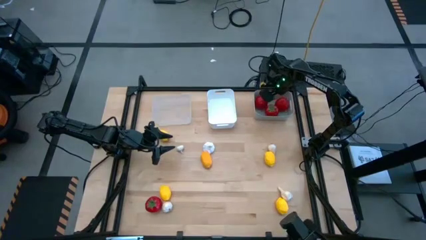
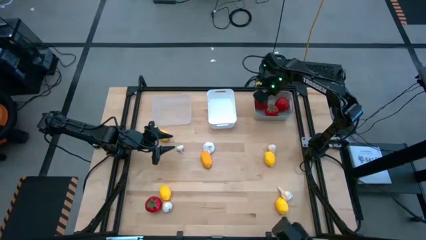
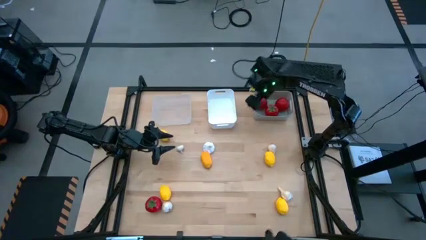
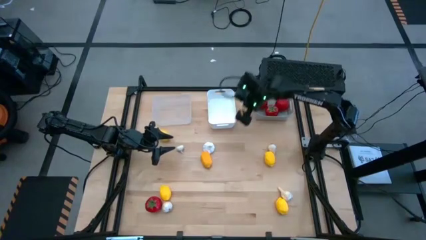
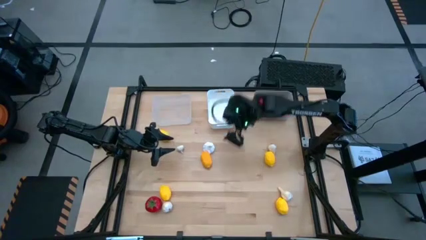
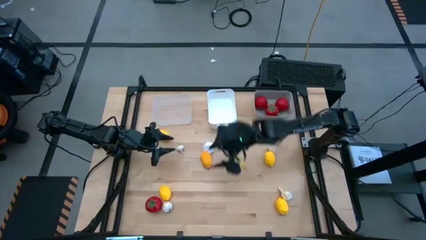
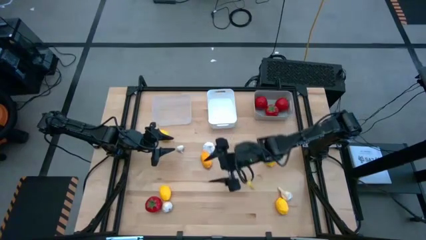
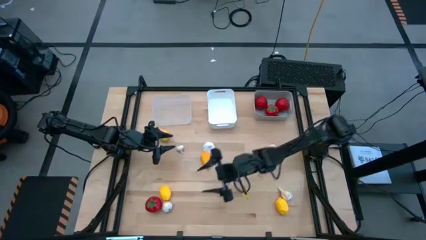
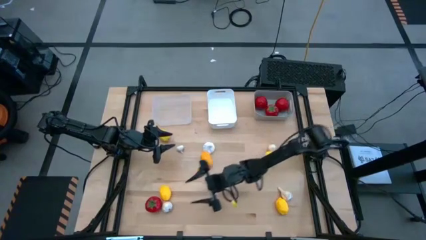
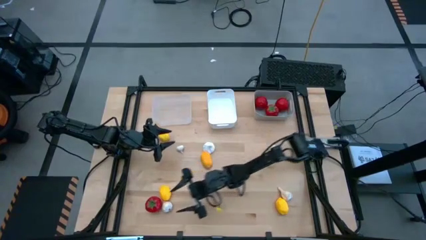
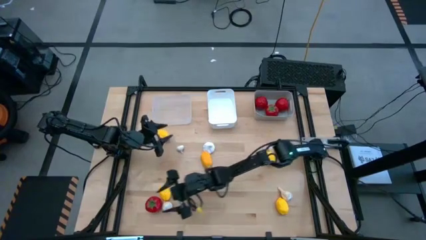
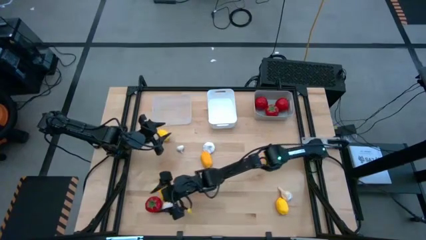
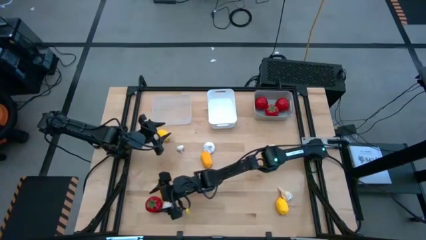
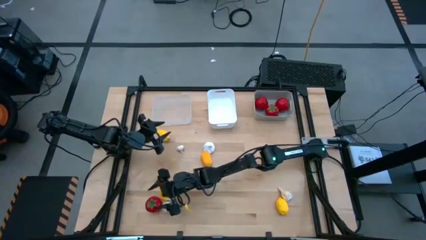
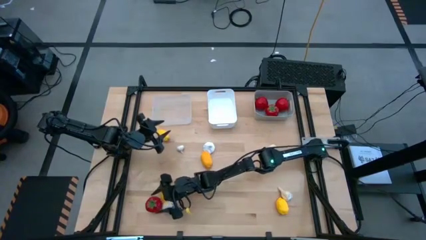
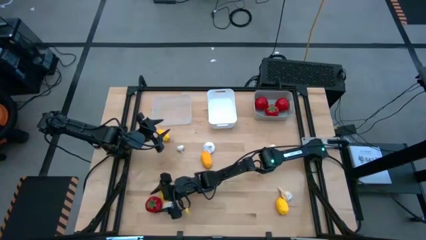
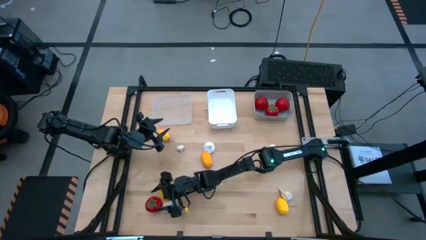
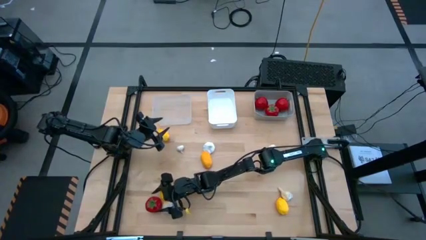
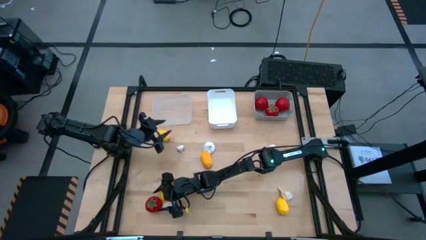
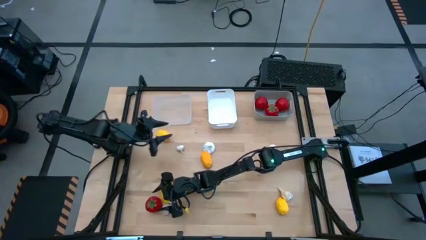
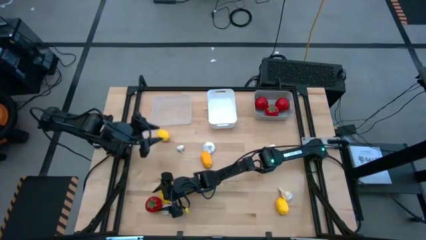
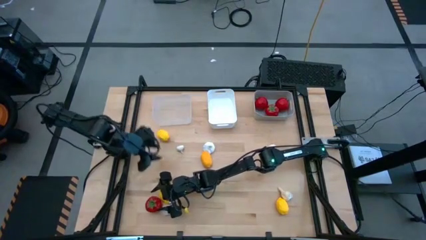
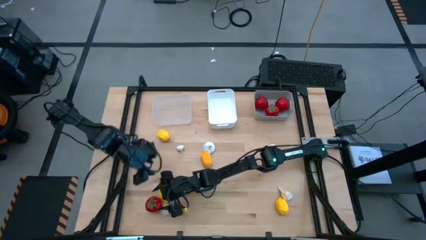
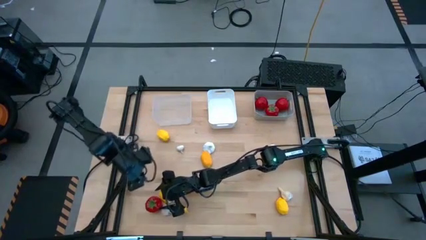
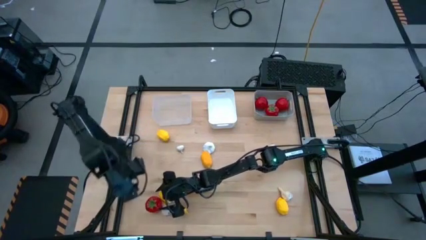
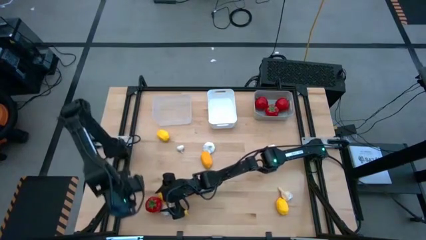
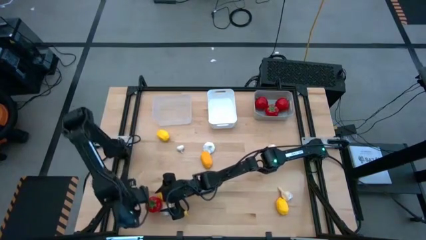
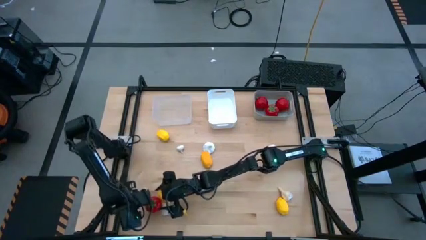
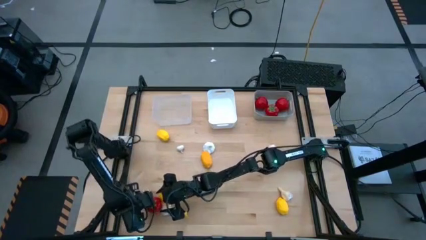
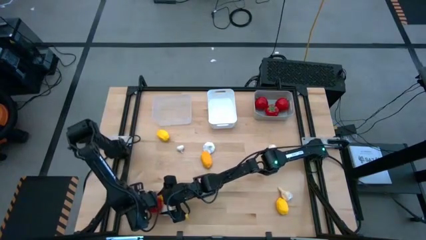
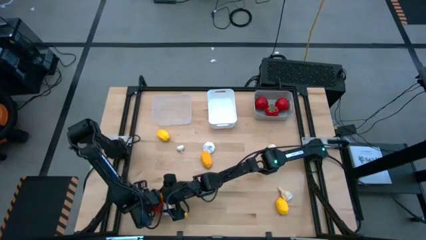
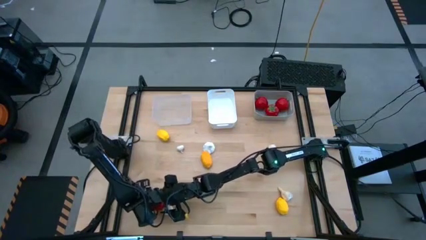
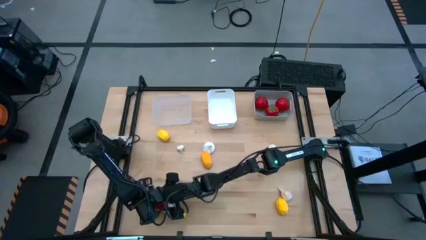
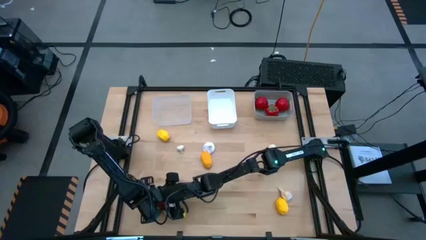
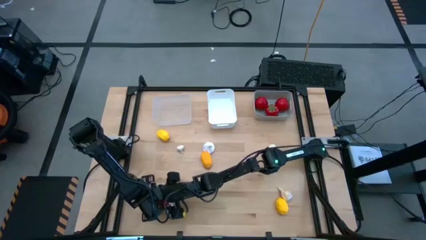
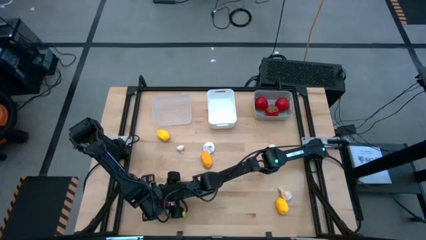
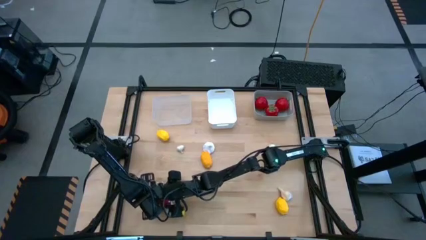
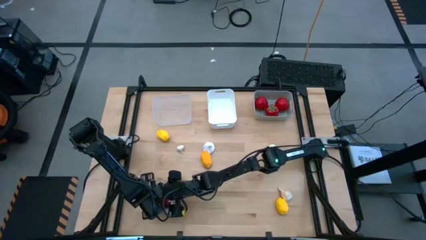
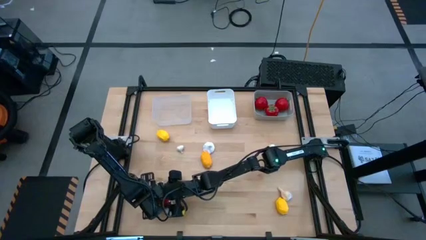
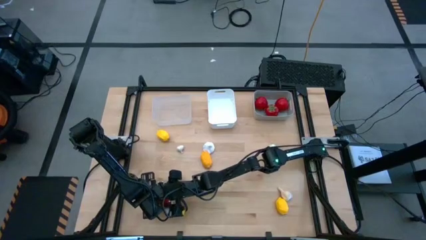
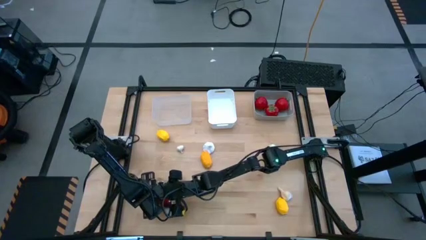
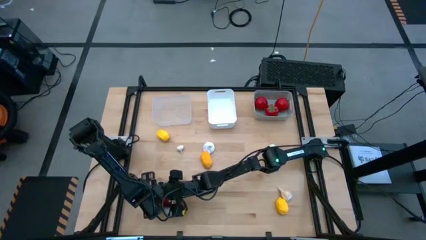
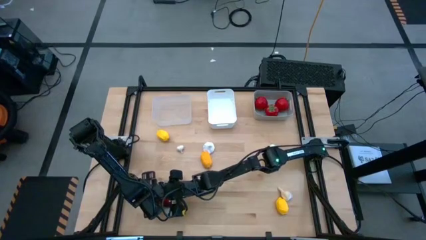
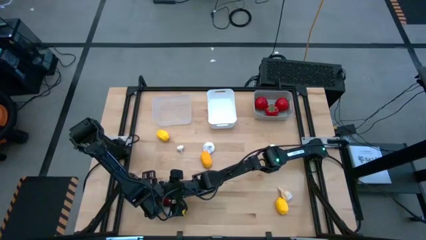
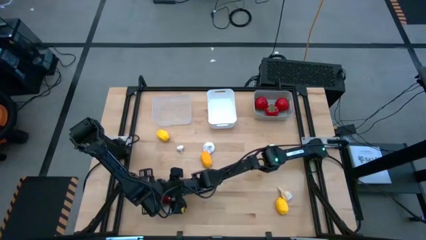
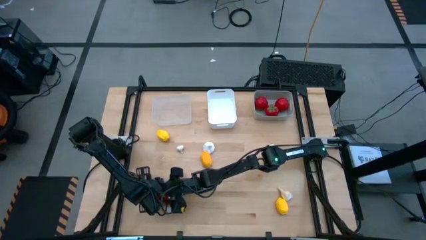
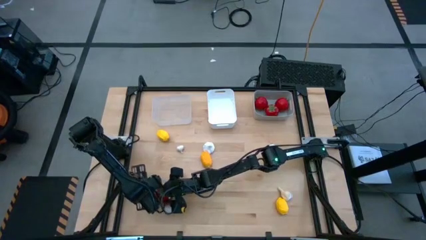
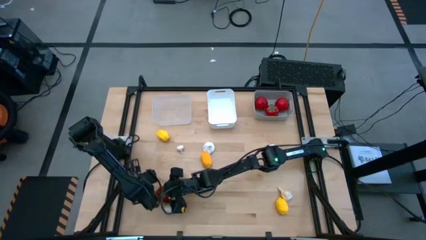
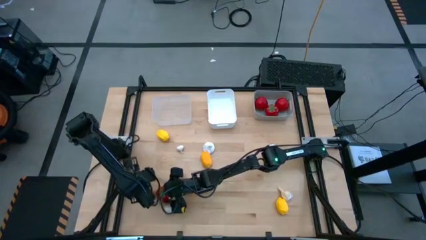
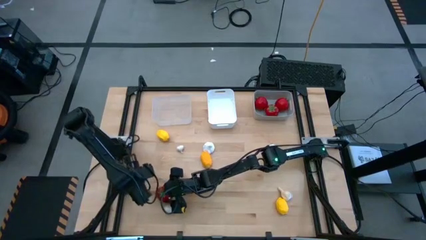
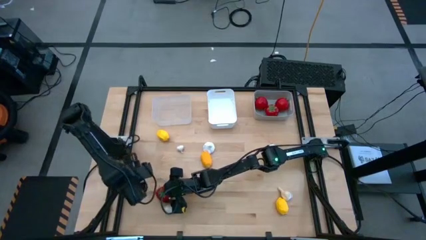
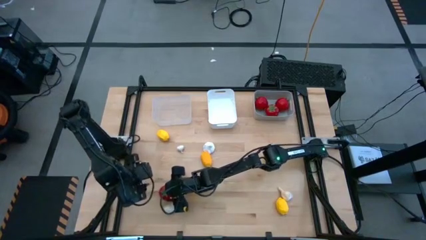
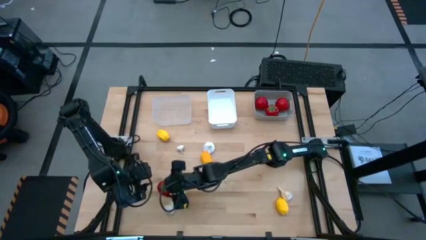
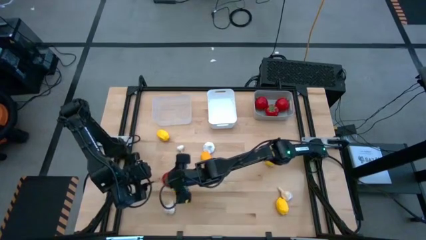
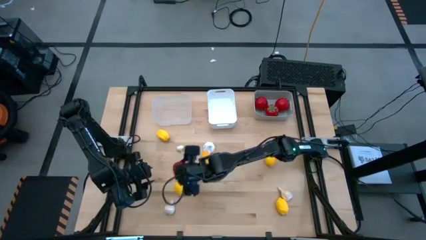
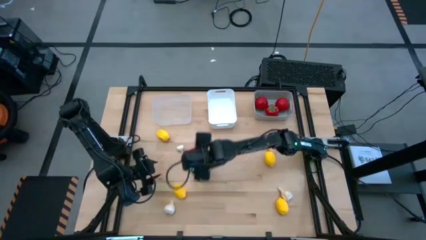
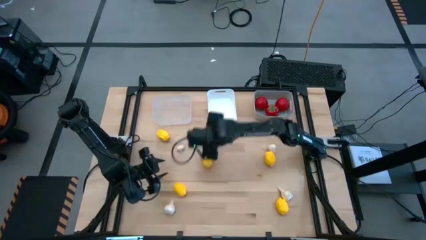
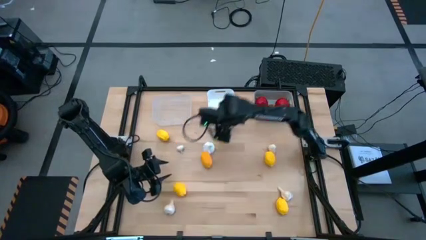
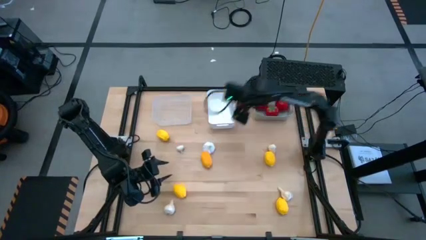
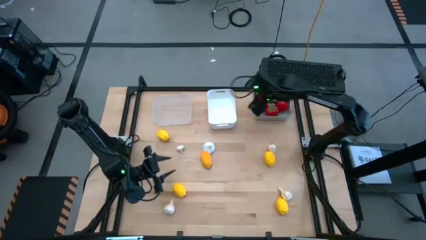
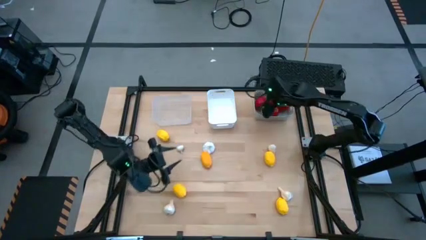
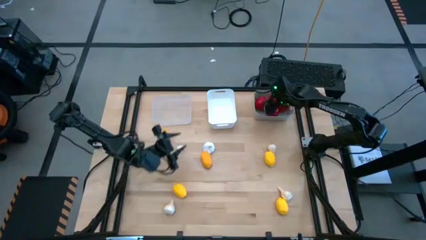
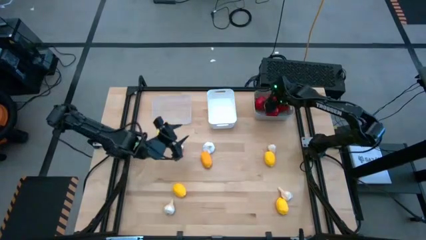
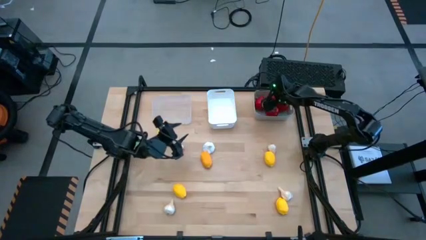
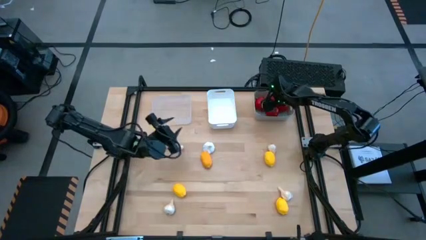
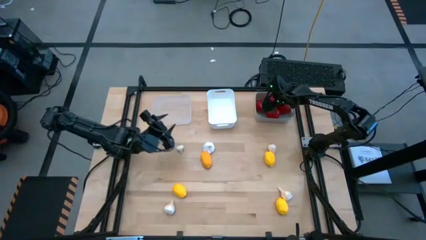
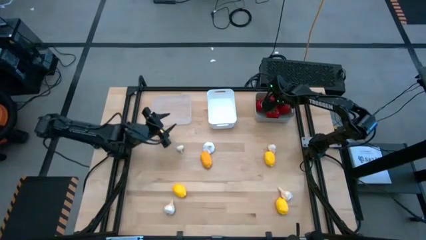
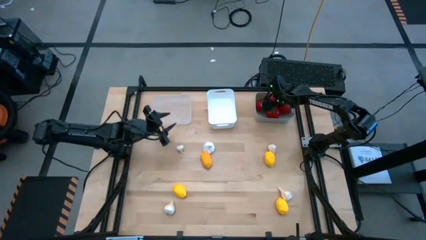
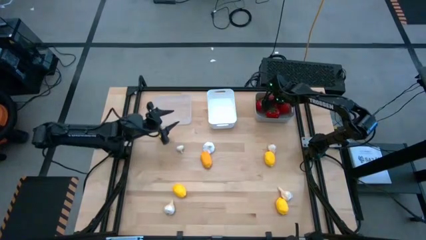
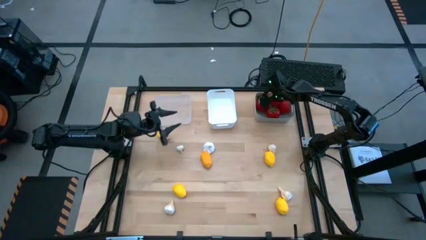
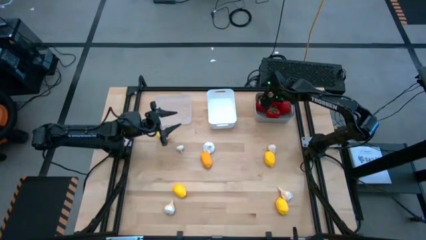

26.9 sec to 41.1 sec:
Task: Sort produce into baskets
Put the red tomato into the gray bin

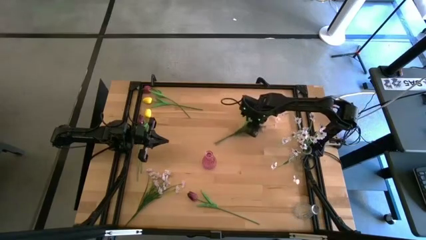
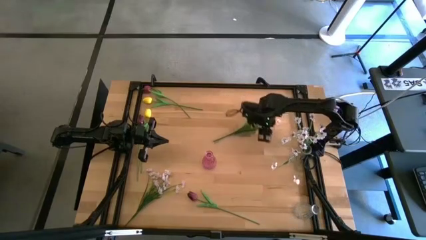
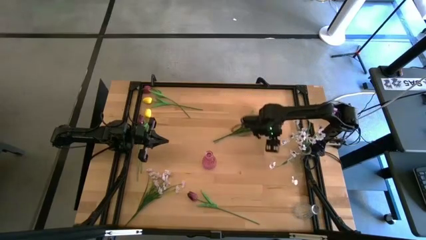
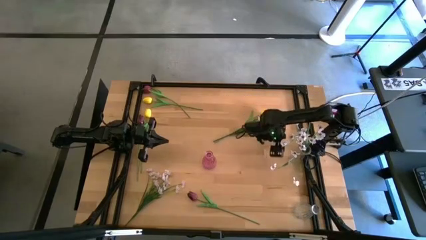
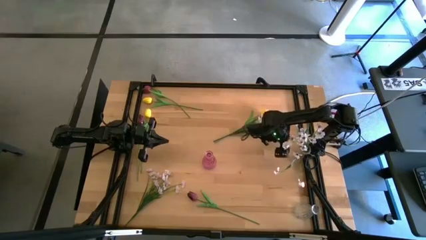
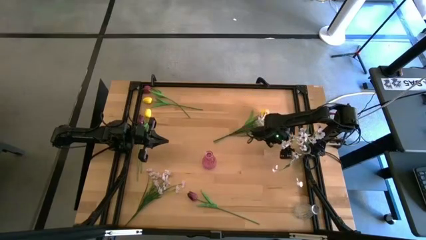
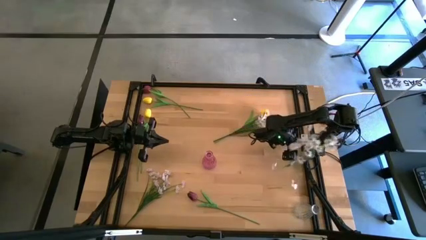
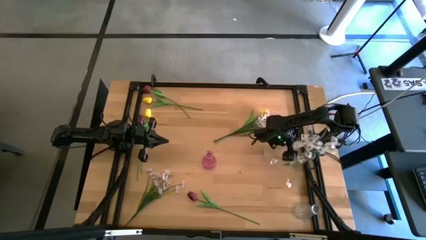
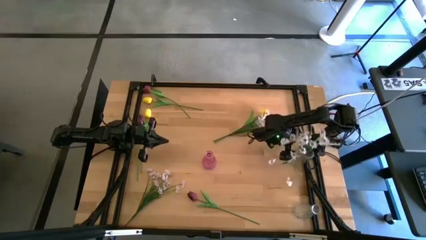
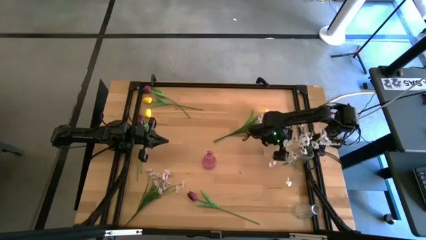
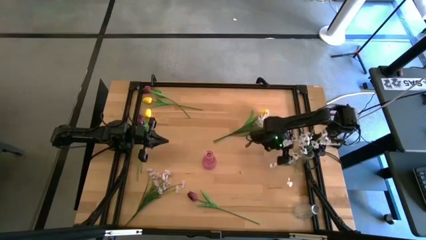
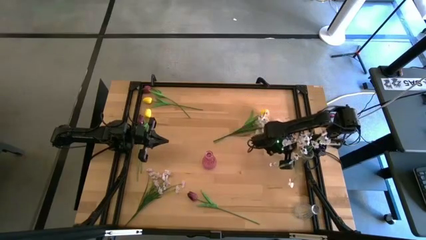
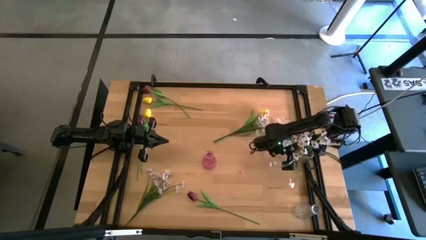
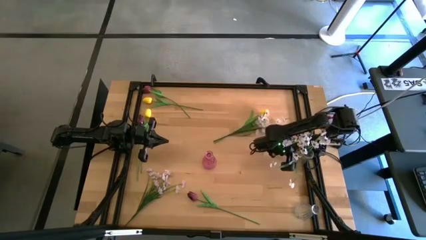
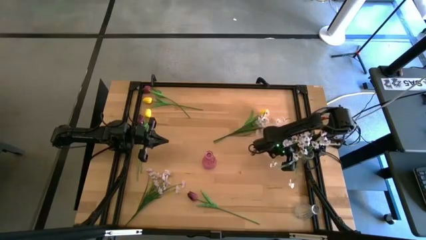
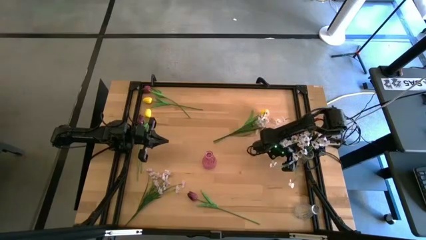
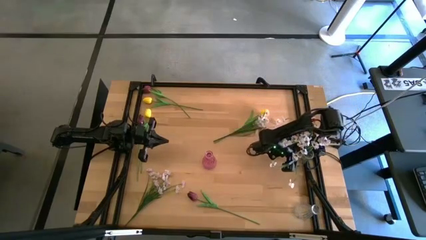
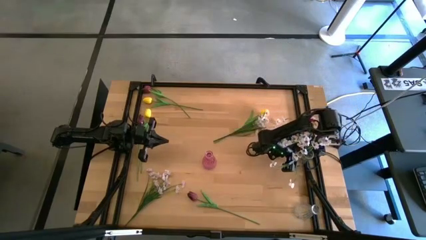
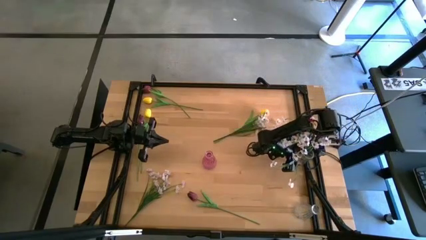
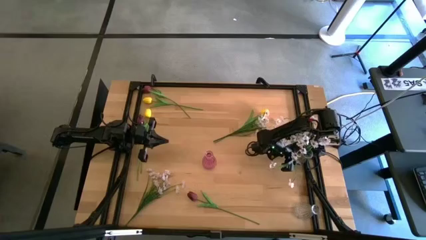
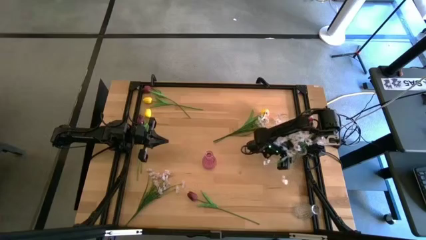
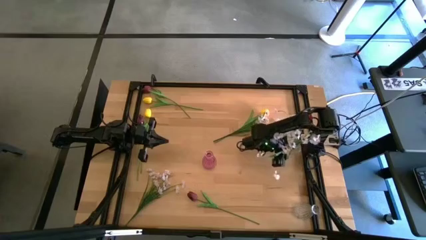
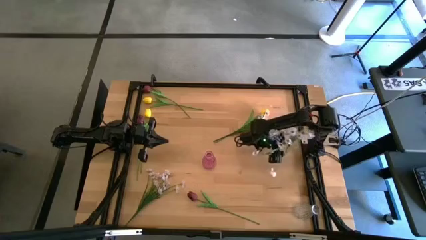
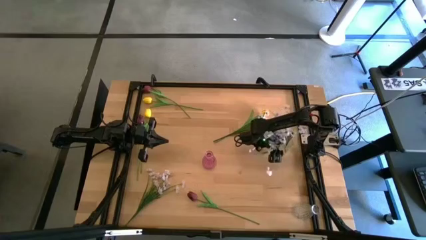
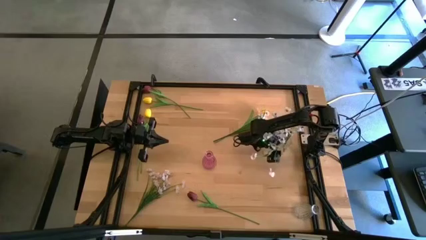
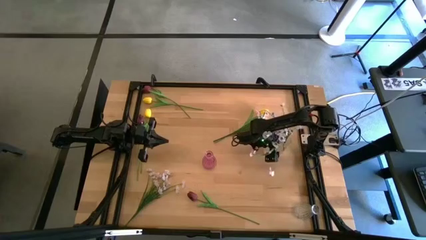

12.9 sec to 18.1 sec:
Task: Sort flowers into vase by color
Adjust the top transparent vase on the table
